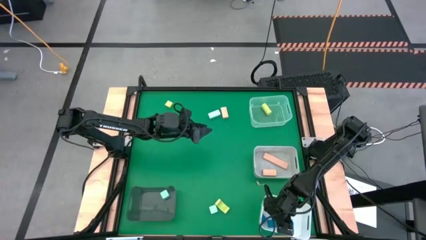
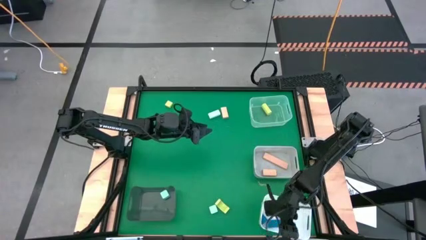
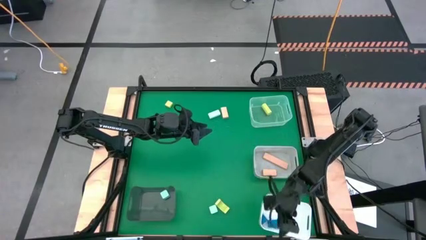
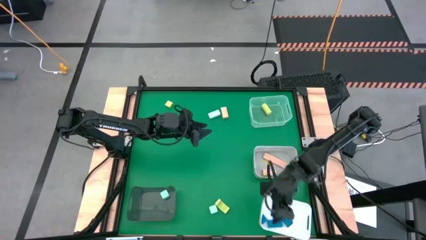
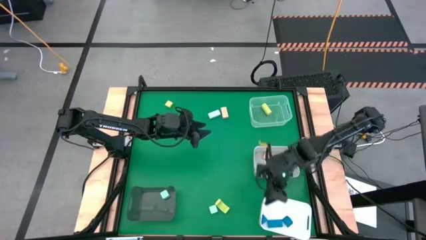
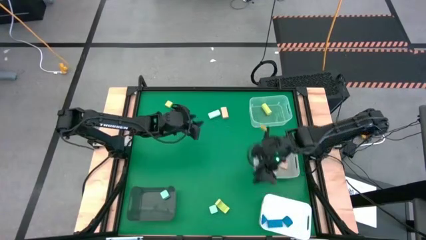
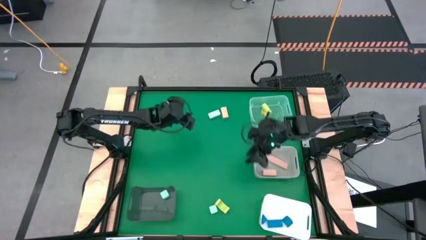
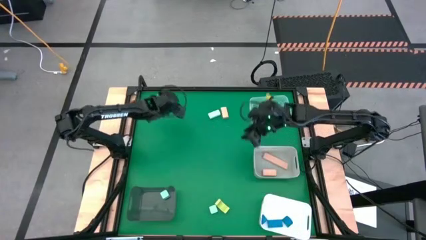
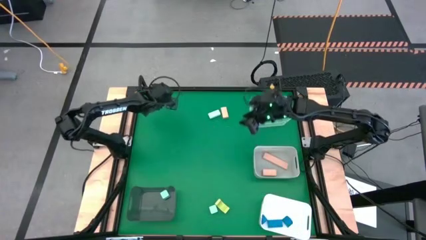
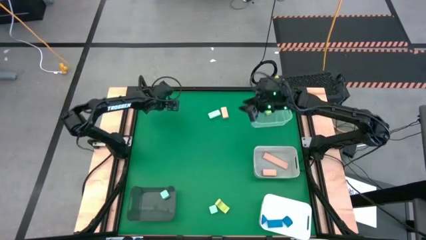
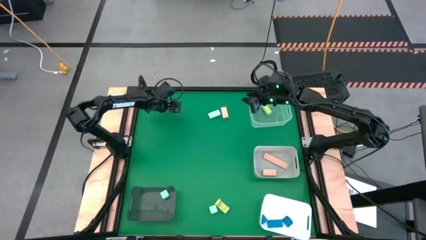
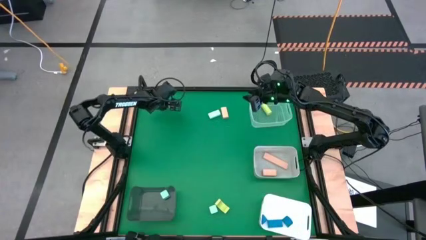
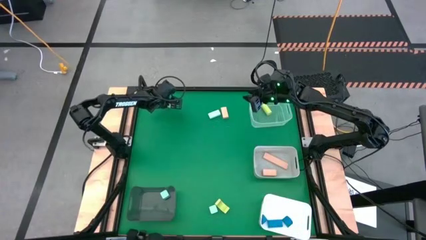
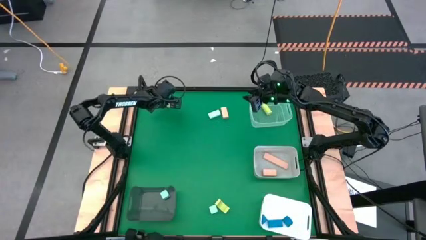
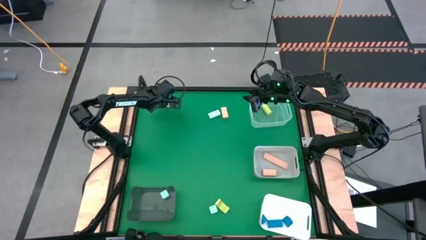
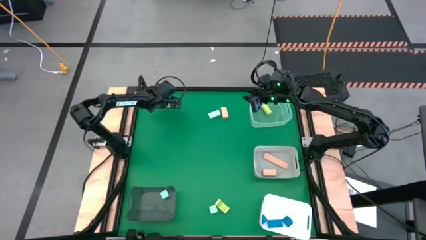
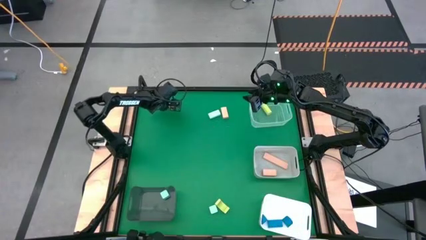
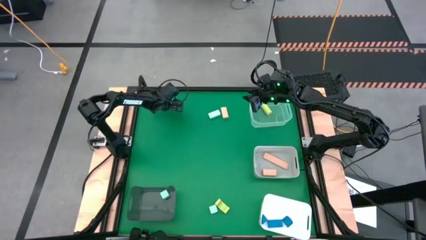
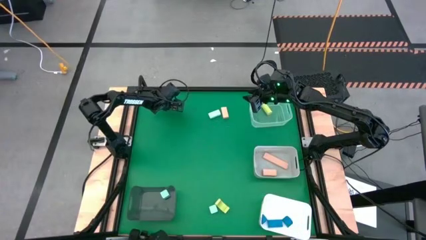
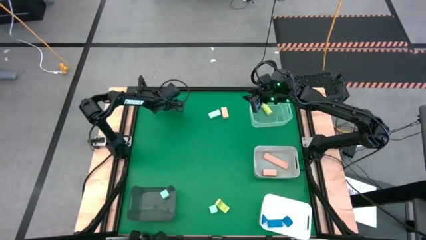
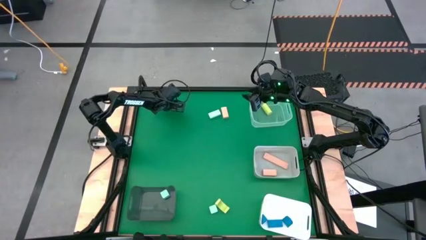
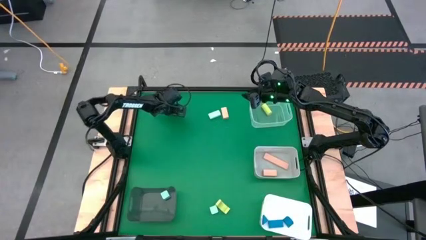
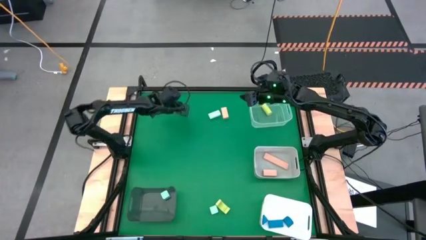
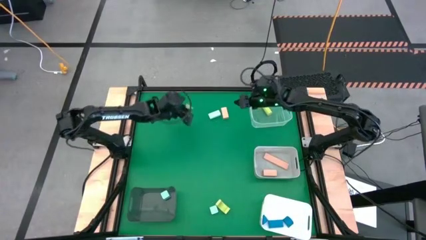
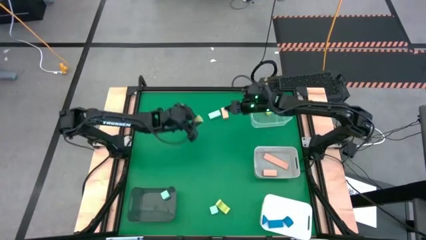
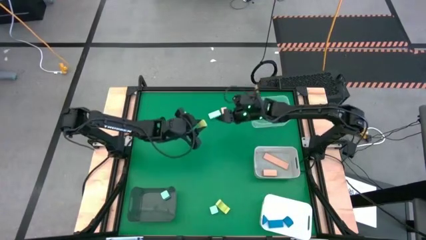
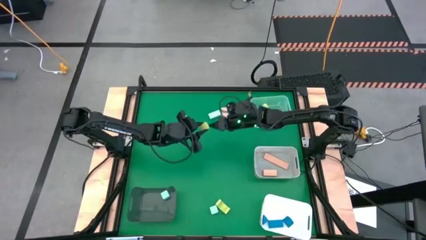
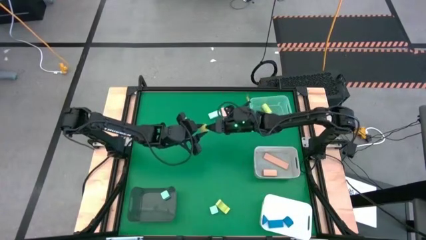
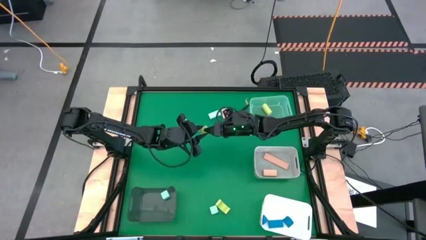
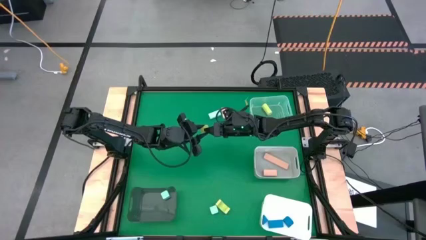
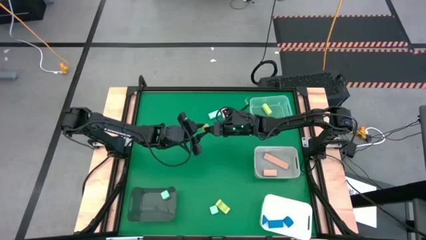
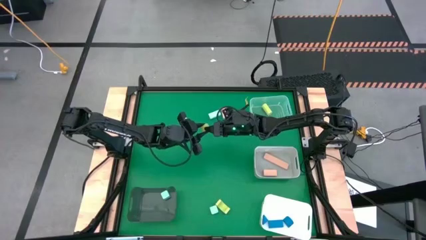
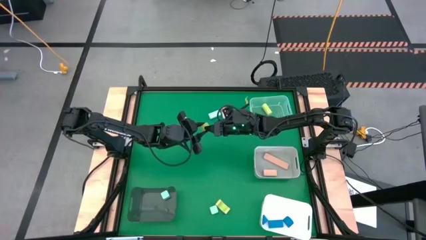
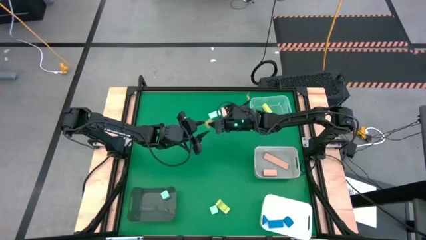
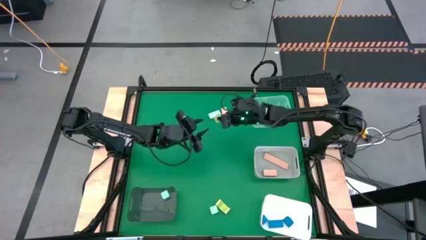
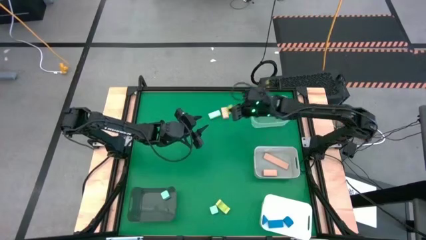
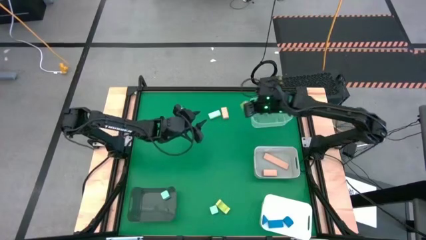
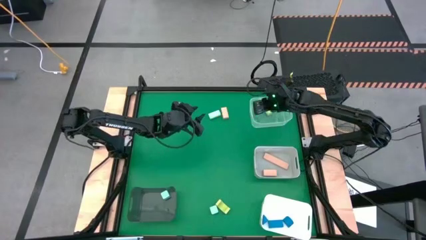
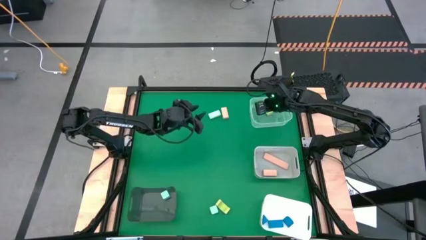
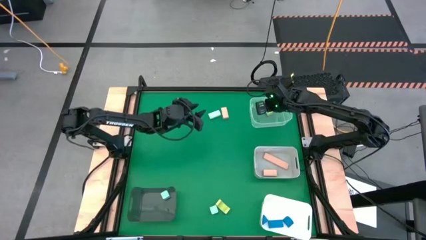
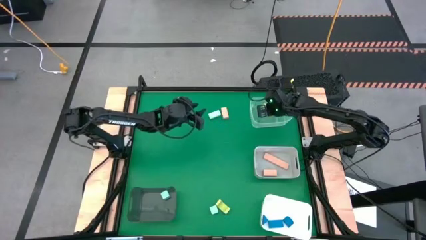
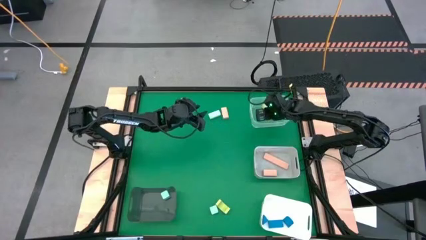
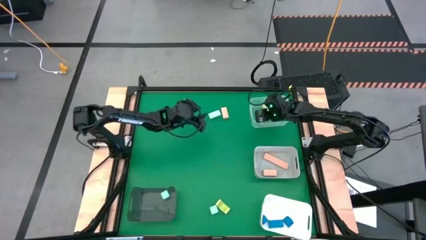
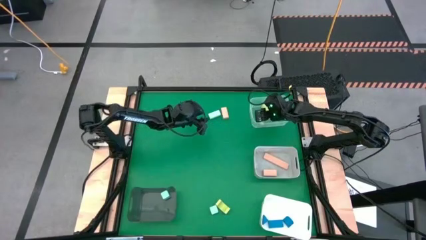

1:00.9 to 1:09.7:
Task: Sort & place blocks by color
Put the top green block into the transparent bin

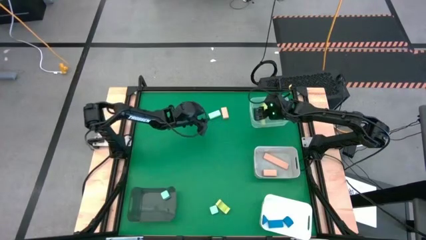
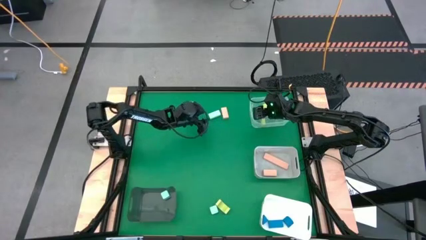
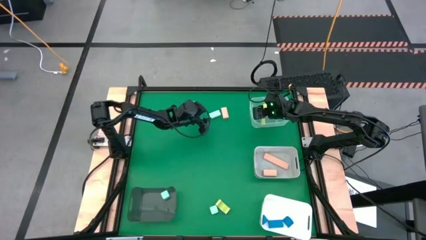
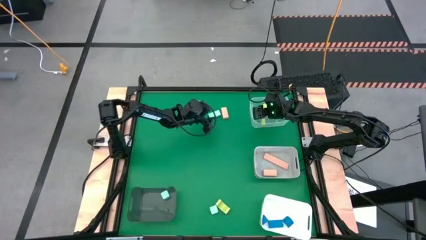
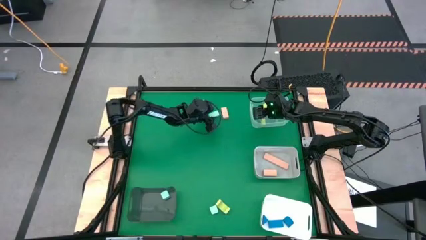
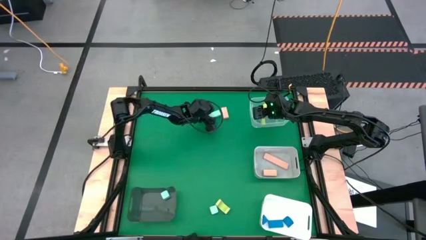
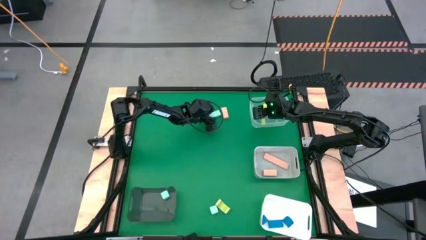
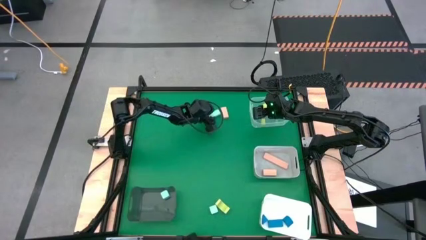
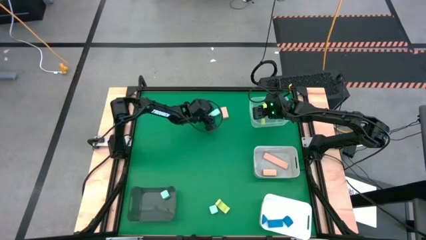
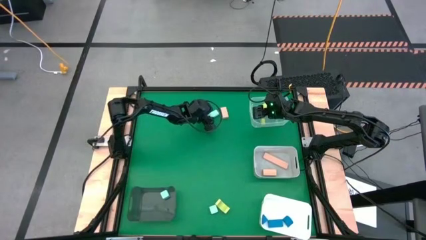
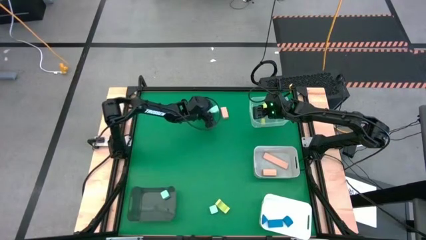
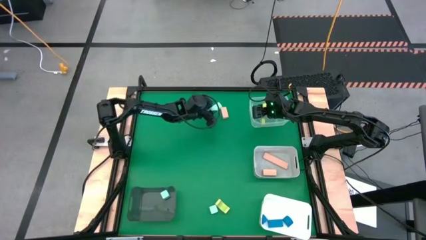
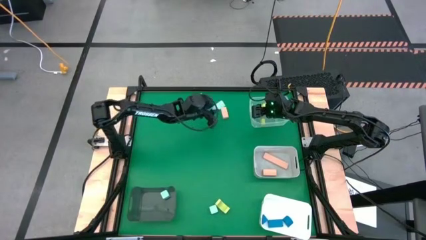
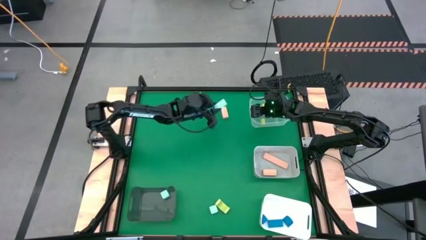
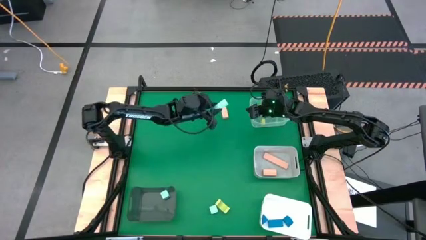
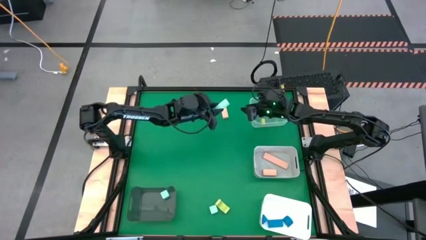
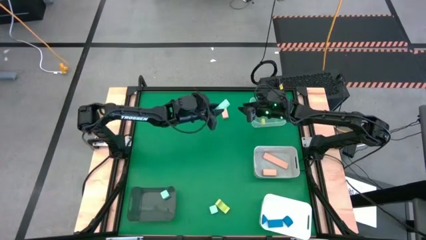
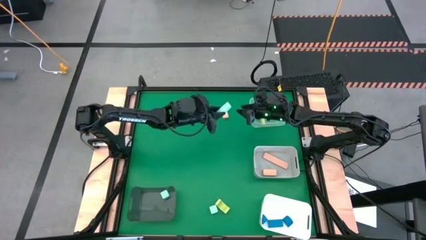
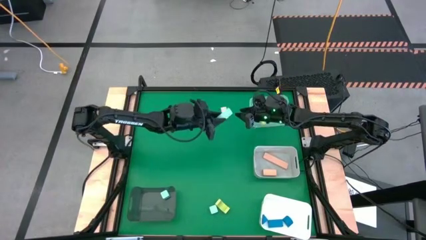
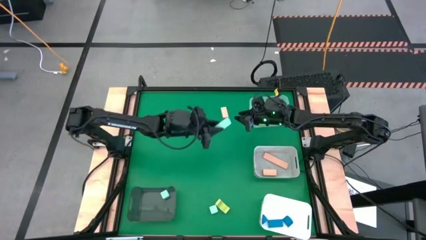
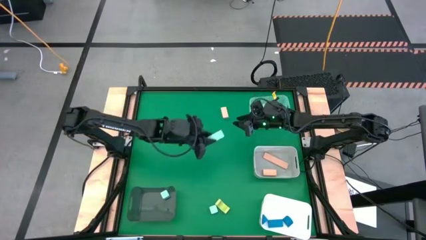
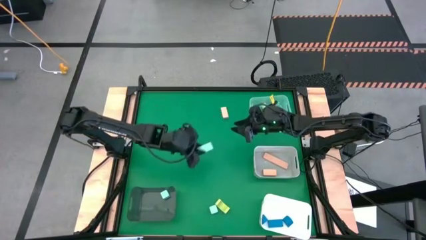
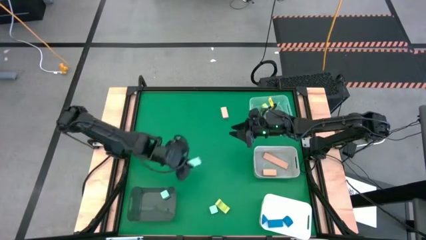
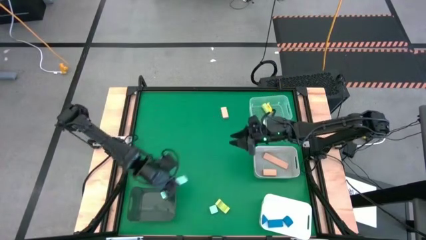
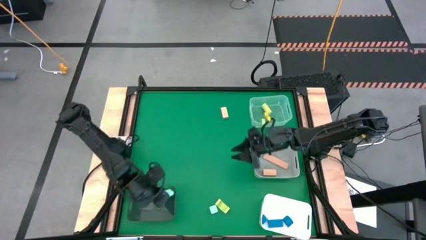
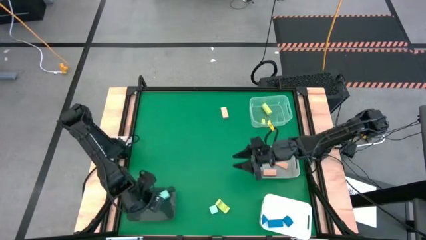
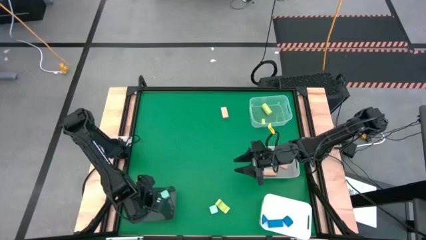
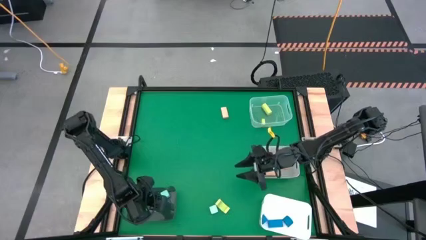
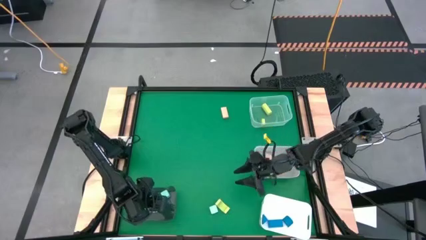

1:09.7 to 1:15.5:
Put the top light blue block into the black bin

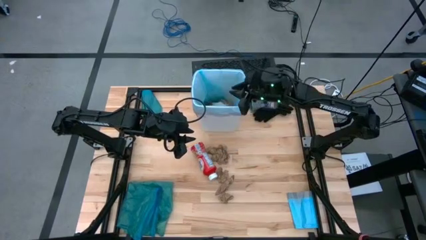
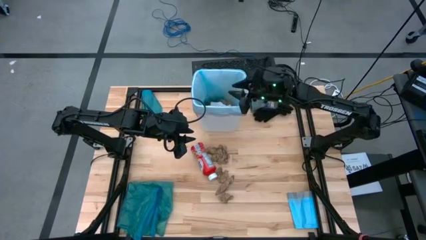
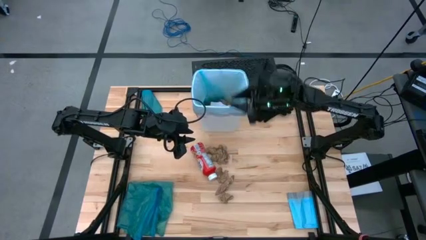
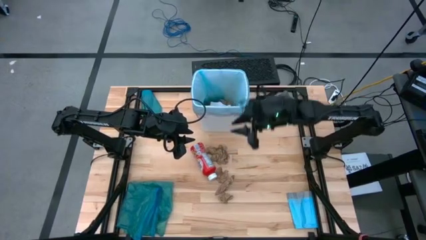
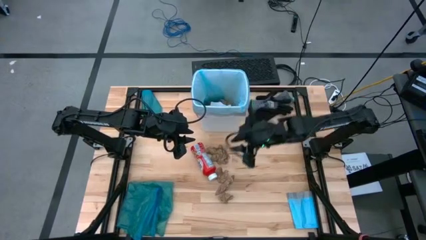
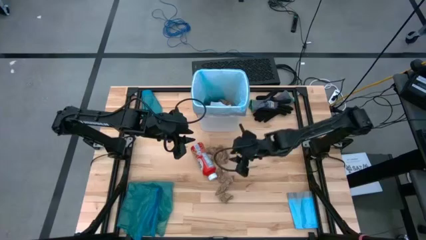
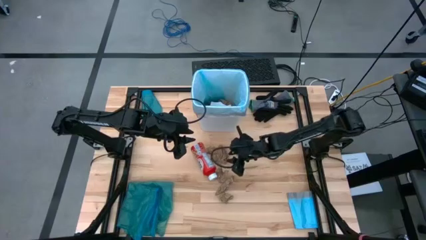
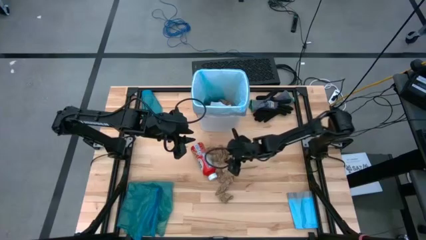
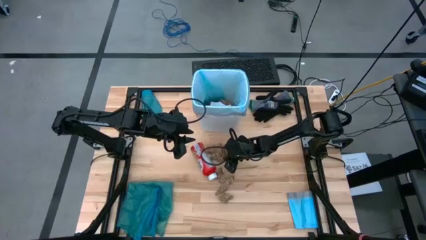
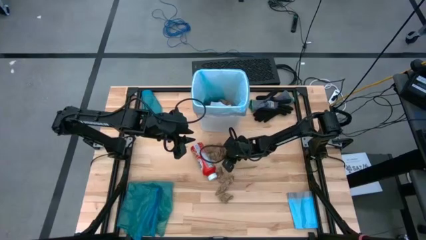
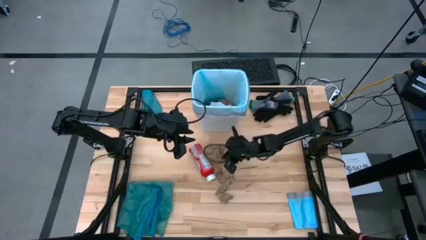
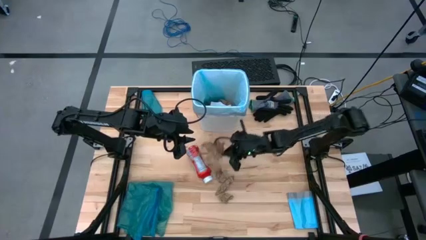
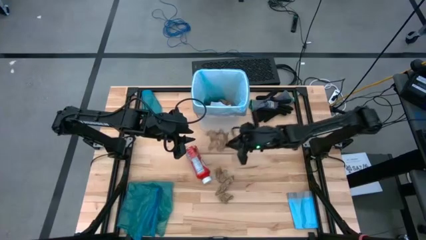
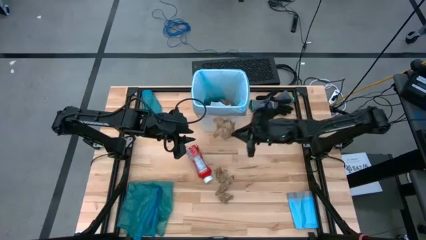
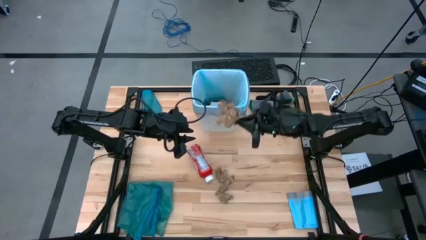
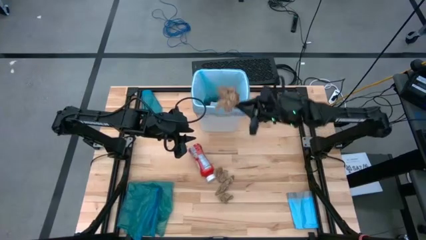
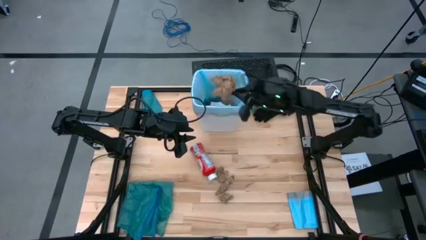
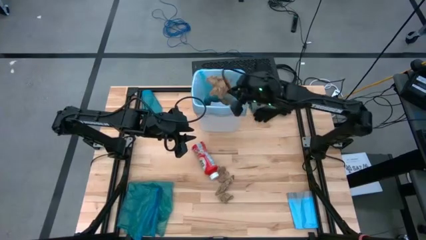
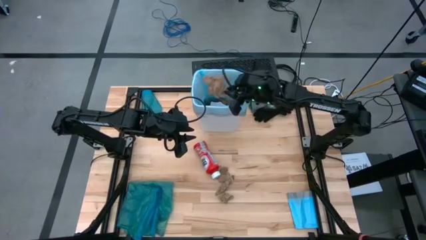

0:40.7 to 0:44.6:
Task: place trash/remove bag and relplace
Put the brown paper into the white trash bin
